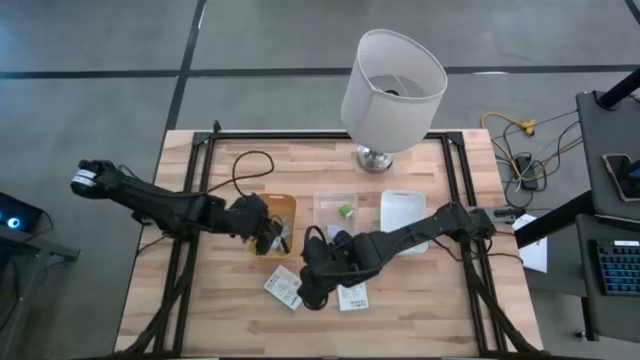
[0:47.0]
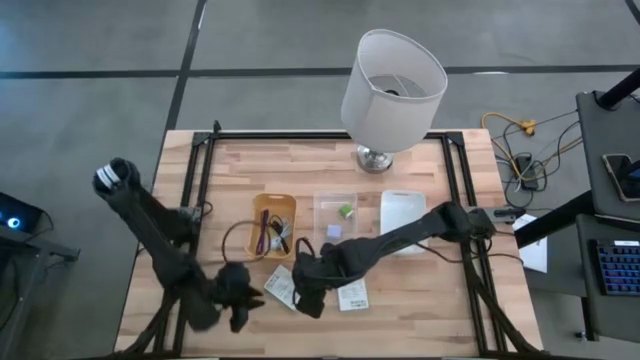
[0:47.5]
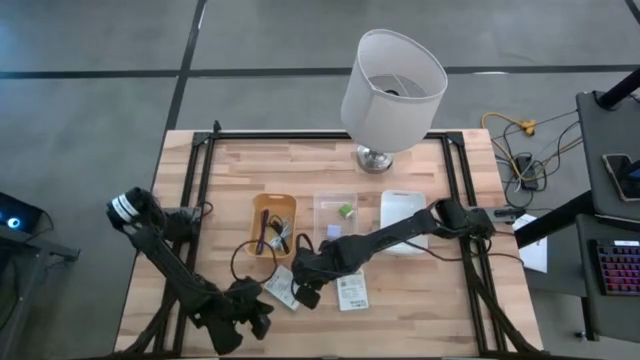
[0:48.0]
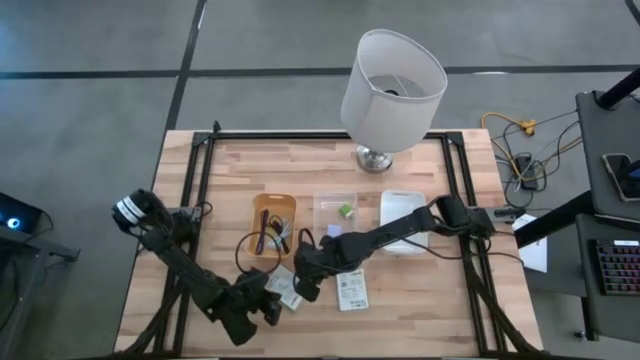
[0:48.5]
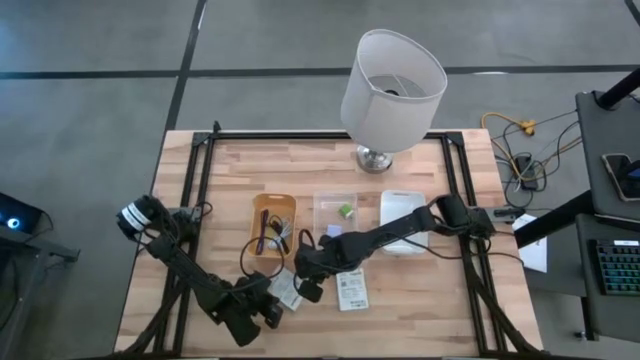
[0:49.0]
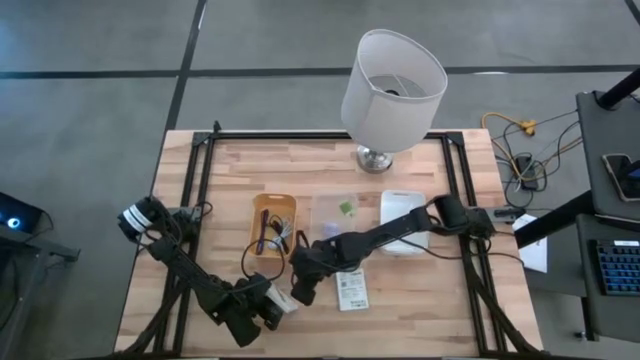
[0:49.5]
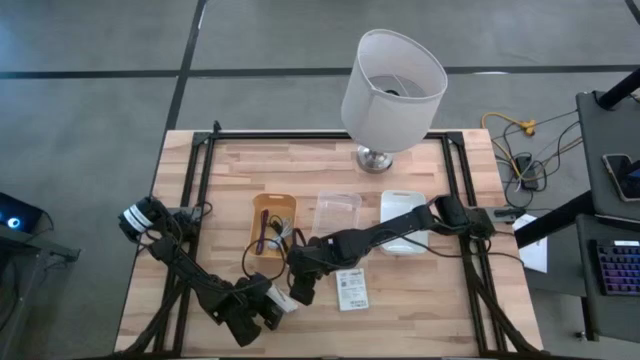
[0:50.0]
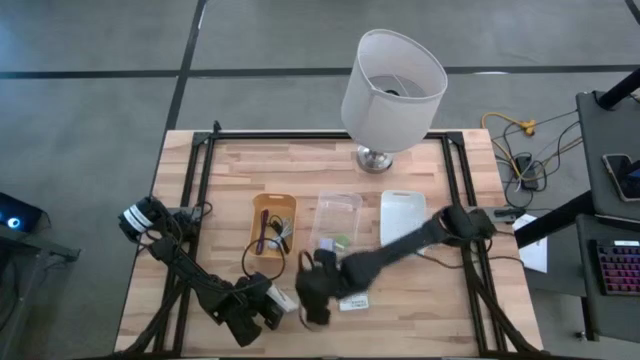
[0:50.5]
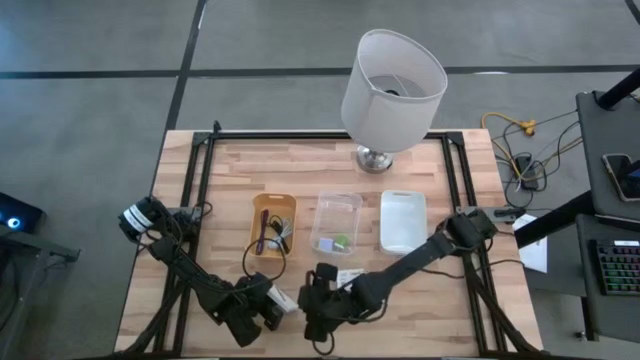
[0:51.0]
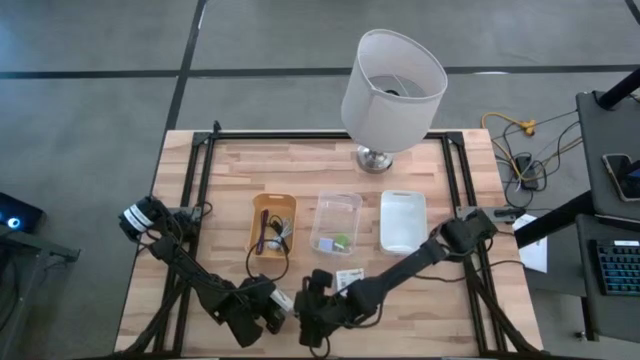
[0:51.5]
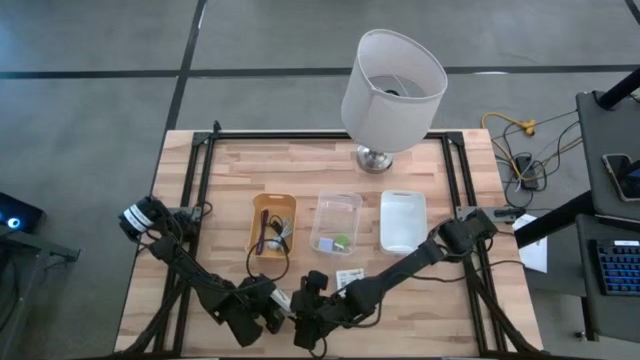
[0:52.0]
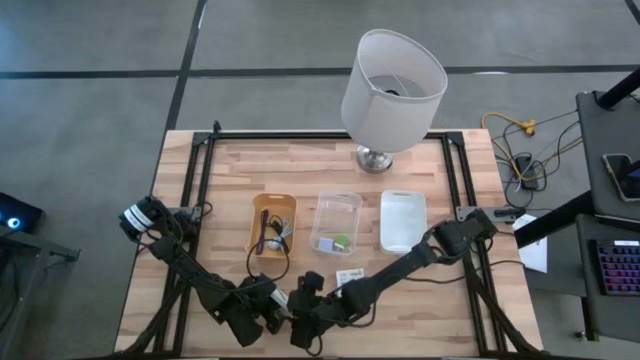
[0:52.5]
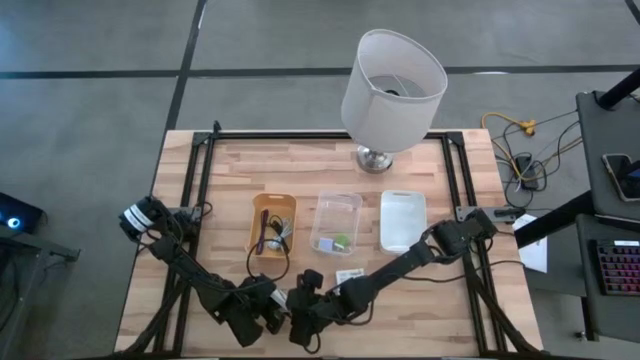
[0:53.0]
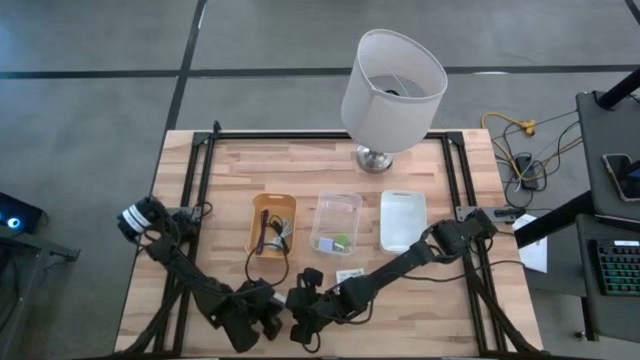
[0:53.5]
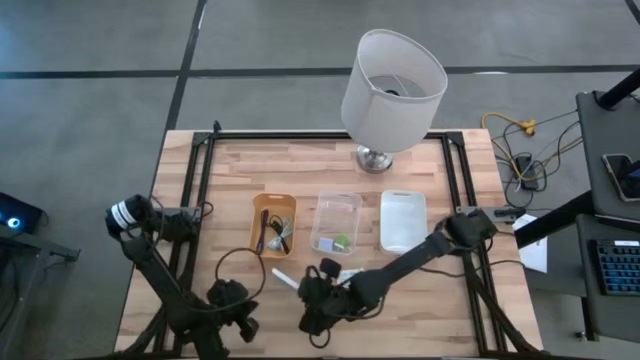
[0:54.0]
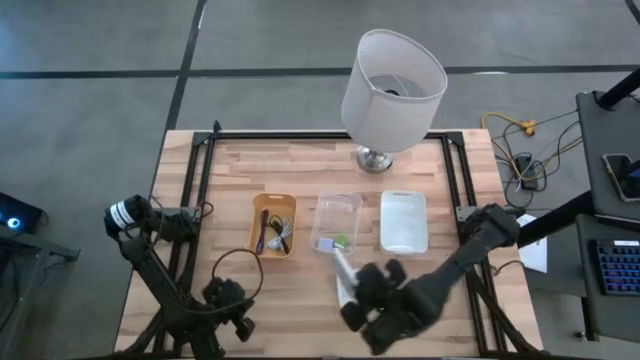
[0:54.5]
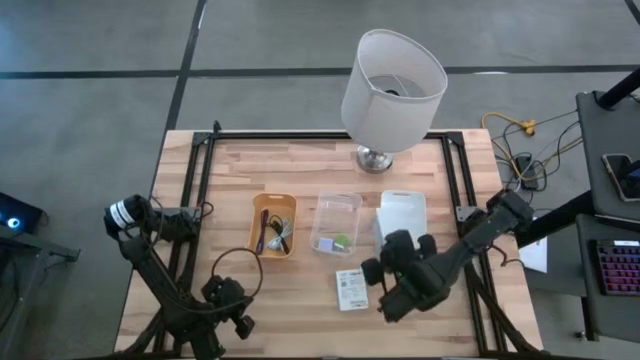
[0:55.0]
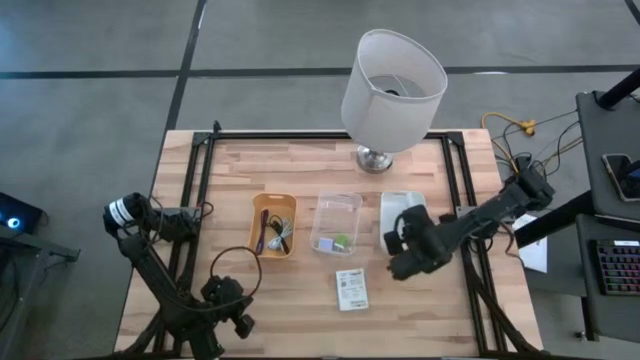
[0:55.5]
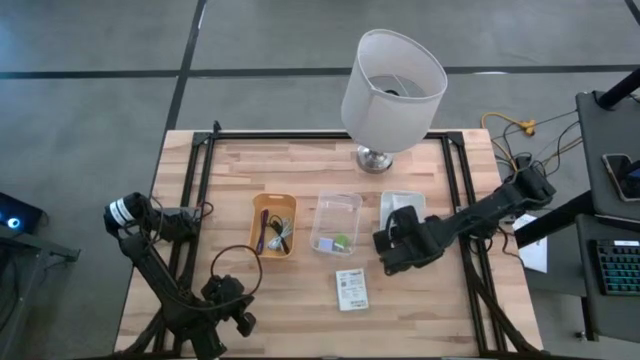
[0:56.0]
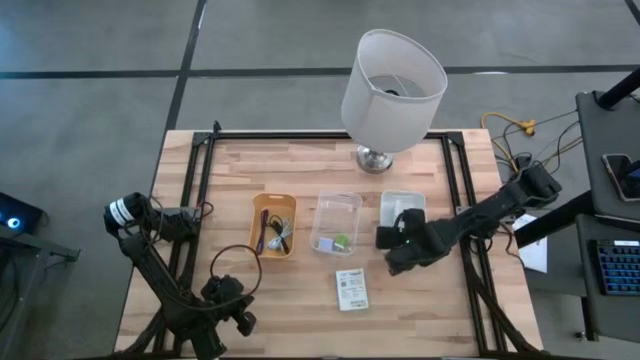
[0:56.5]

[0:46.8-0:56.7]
Task: Pick and place items into bin
Put the left white card reader box into the white bin

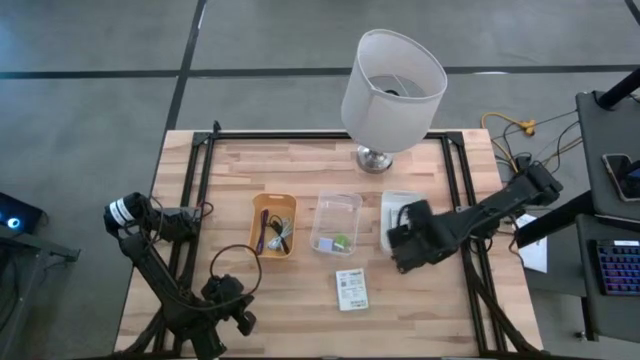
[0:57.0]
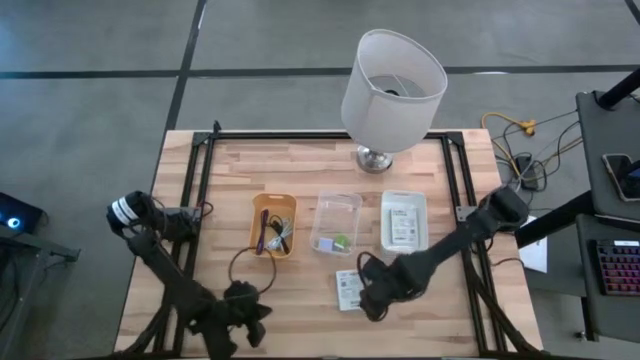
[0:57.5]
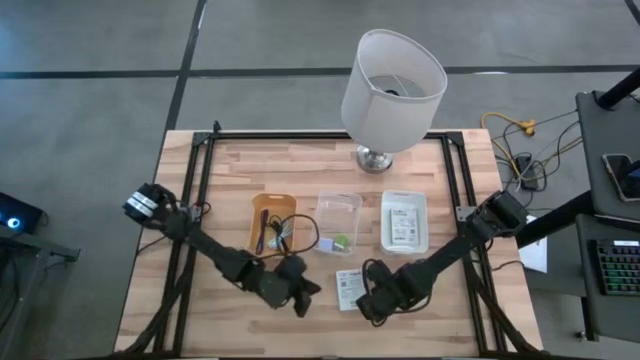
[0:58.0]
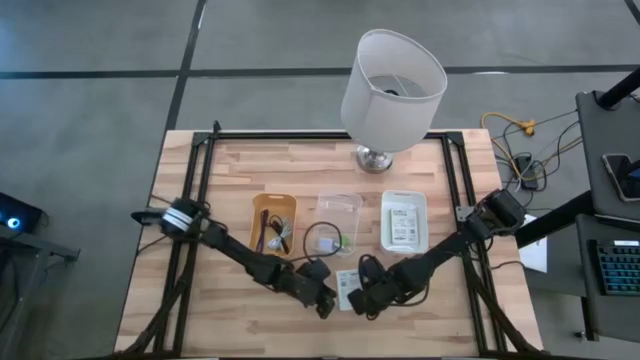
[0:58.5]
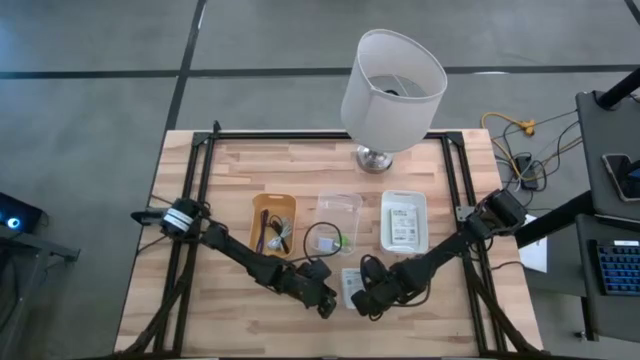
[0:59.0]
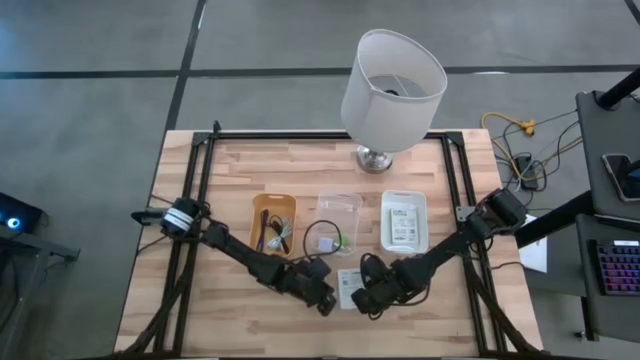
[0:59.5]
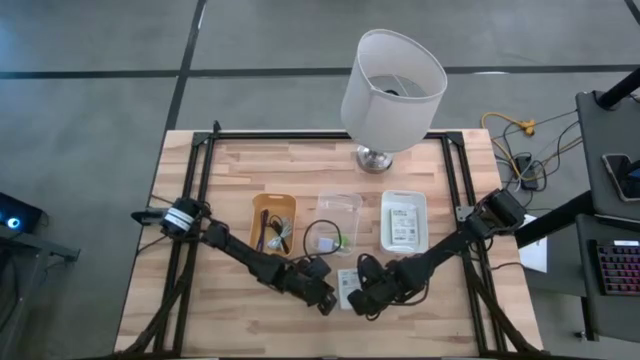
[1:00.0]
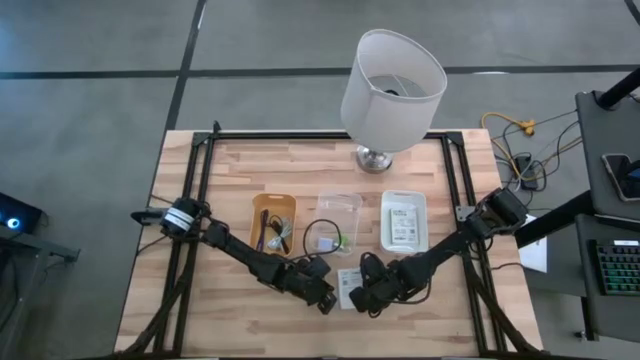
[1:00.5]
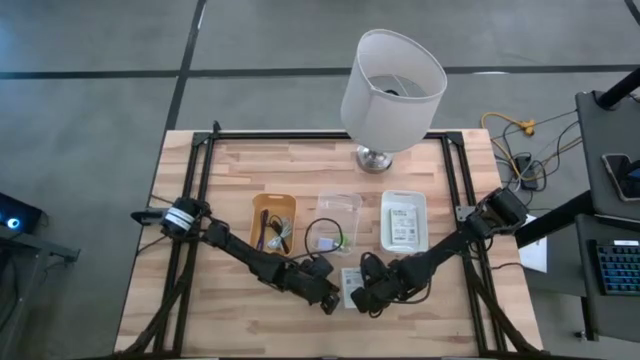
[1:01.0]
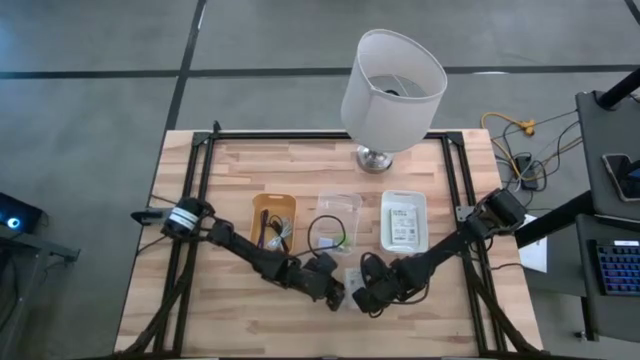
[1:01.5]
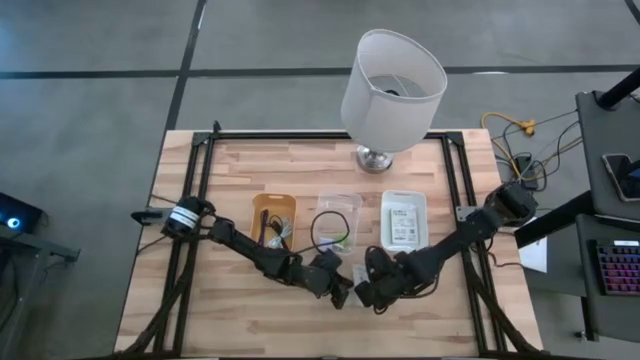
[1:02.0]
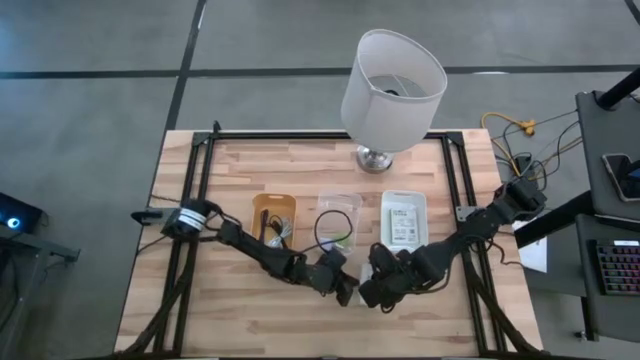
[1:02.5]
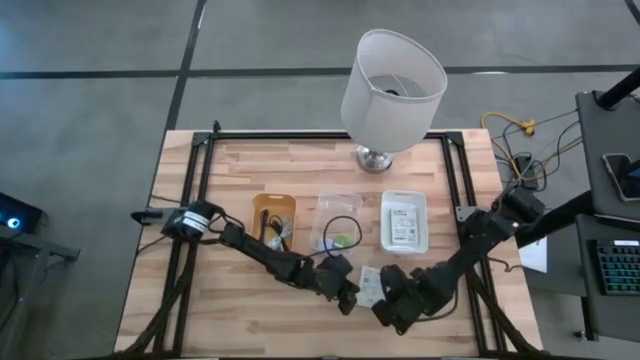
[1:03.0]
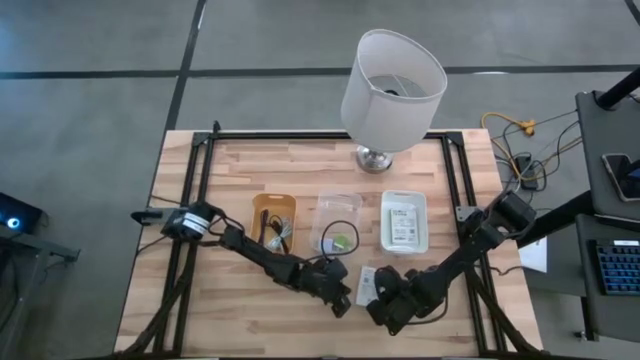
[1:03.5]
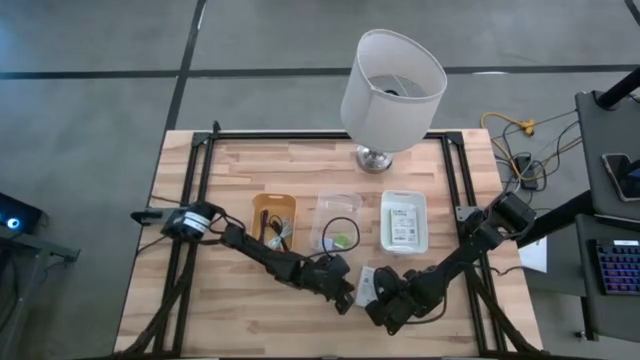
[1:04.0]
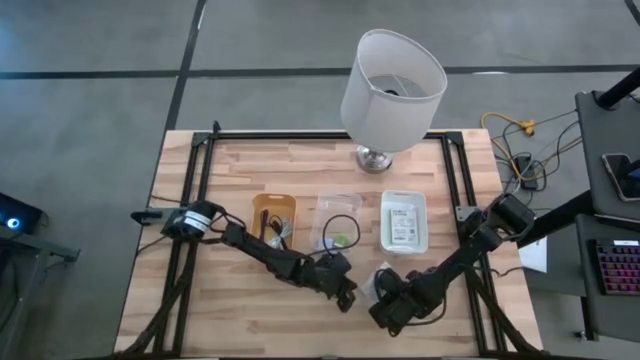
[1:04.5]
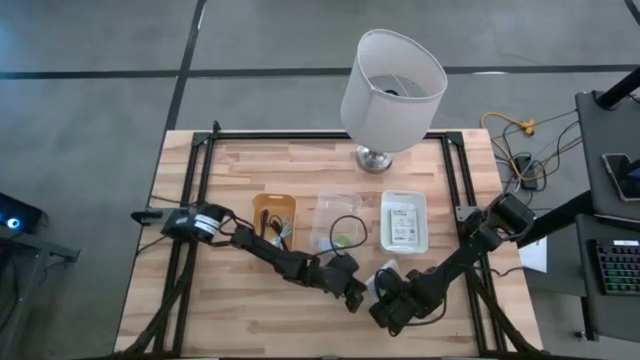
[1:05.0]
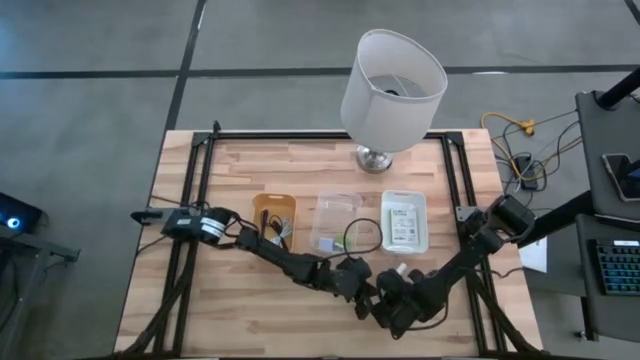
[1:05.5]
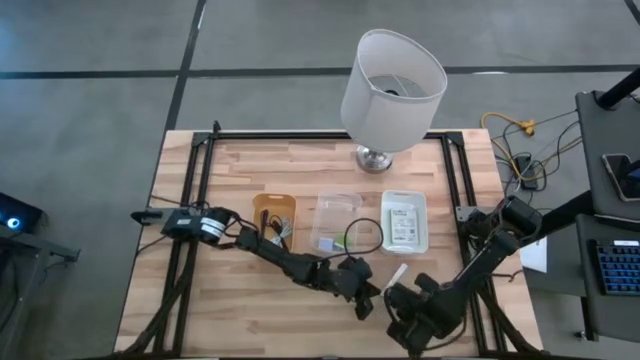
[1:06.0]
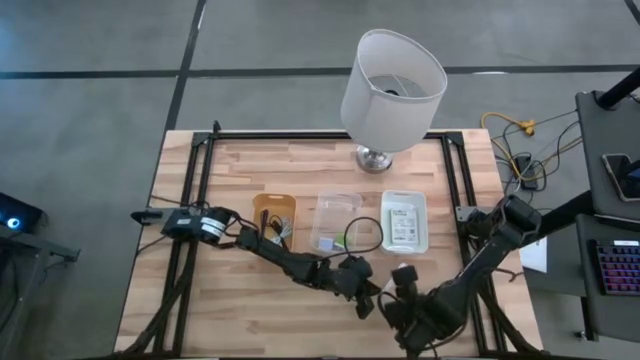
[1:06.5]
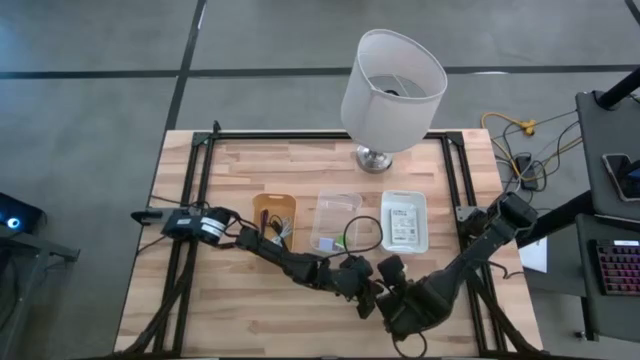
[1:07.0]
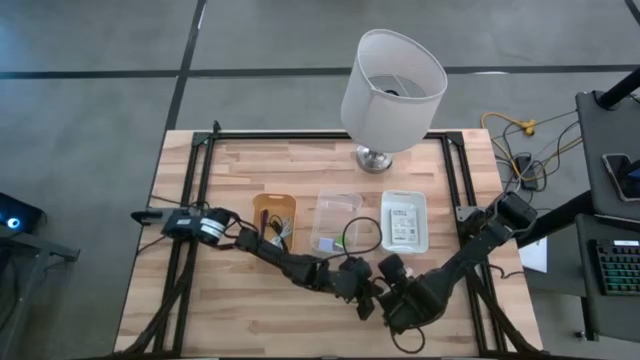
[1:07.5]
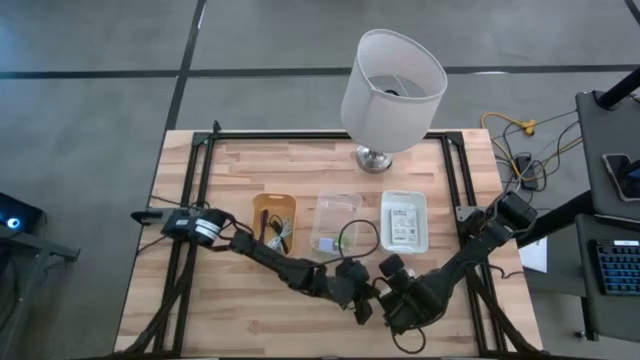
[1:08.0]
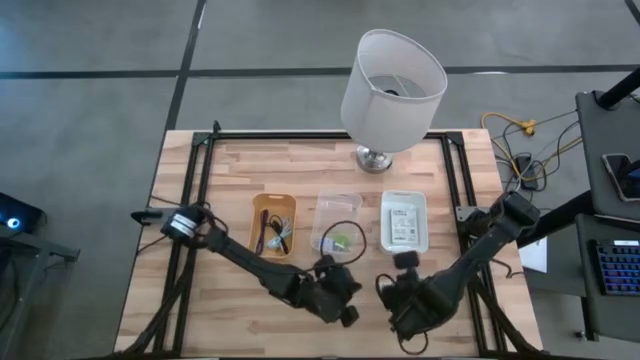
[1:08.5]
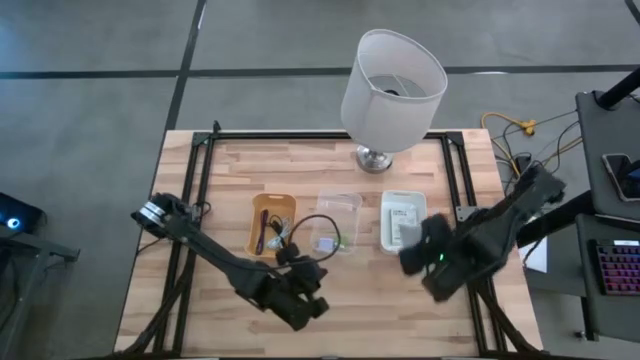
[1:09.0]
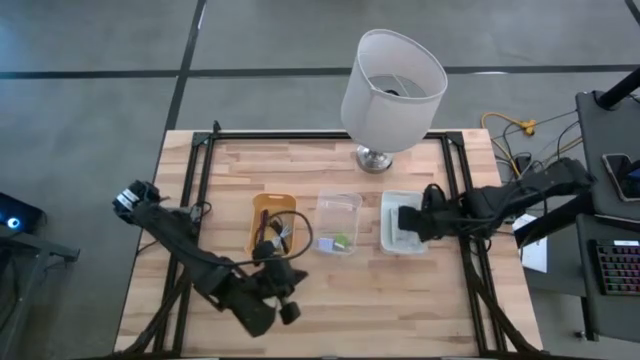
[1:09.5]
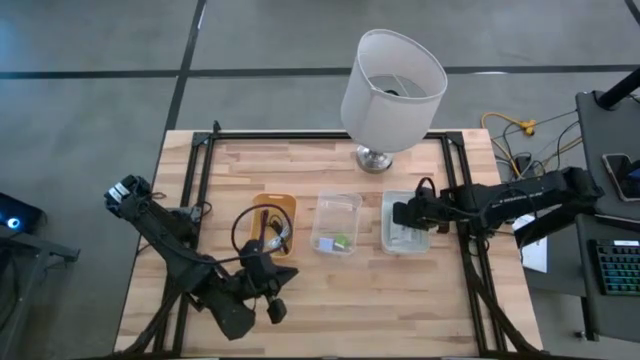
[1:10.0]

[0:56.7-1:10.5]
Put the white card reader box into the white bin
